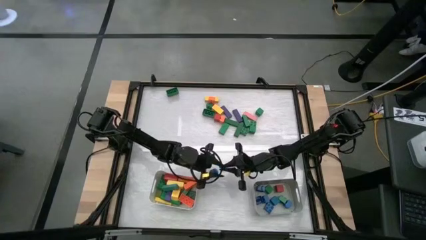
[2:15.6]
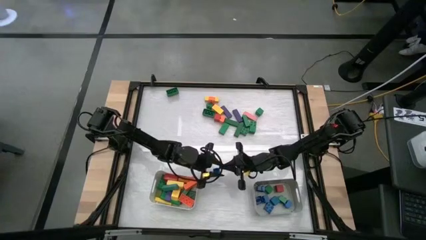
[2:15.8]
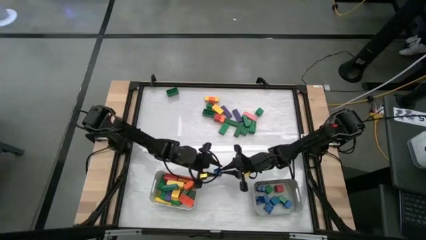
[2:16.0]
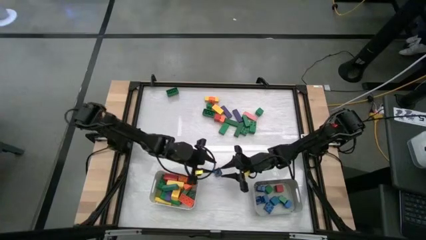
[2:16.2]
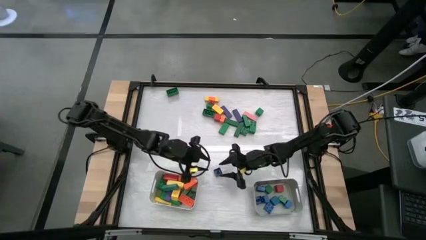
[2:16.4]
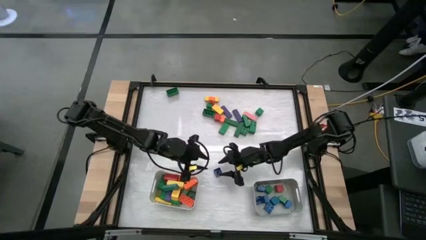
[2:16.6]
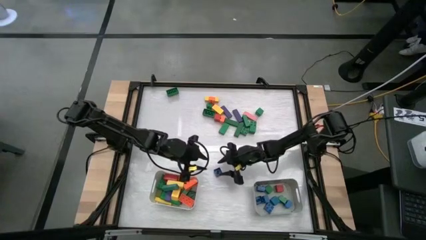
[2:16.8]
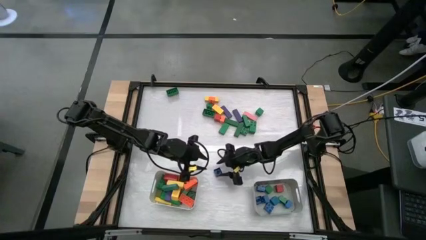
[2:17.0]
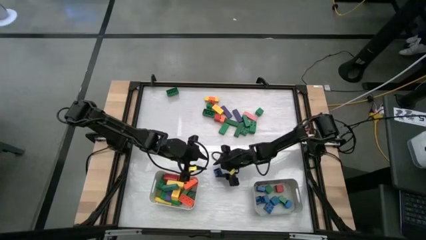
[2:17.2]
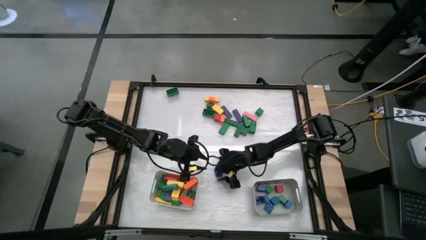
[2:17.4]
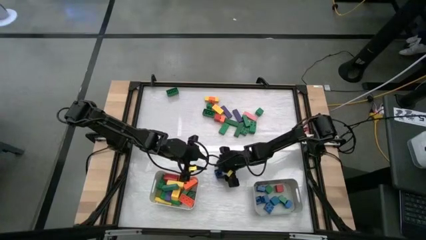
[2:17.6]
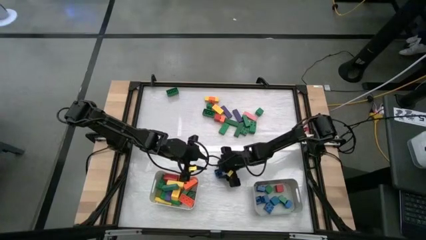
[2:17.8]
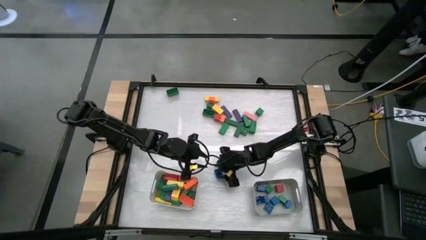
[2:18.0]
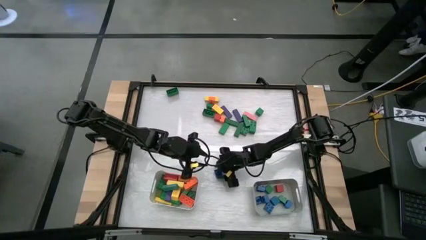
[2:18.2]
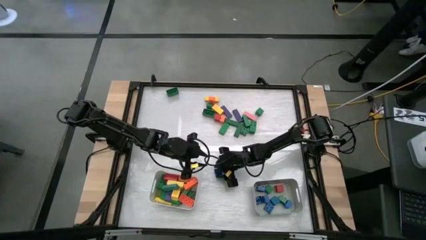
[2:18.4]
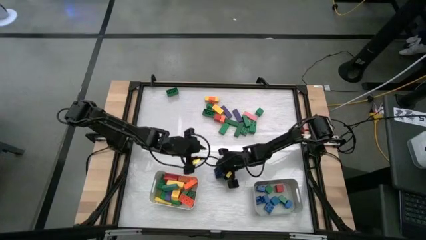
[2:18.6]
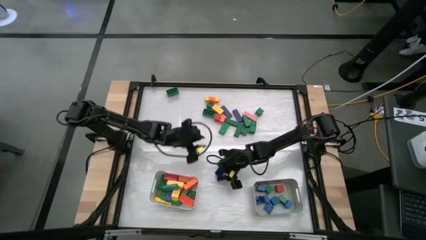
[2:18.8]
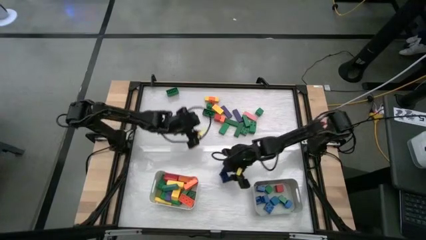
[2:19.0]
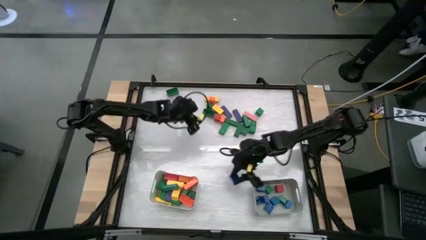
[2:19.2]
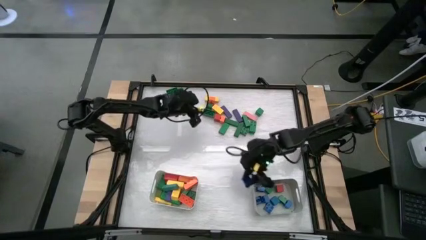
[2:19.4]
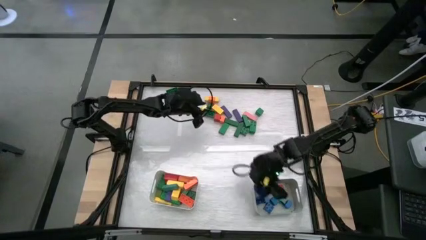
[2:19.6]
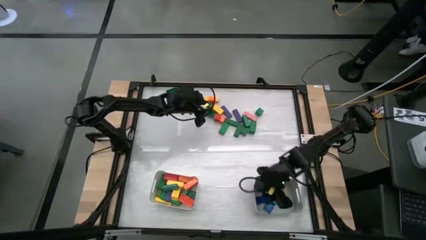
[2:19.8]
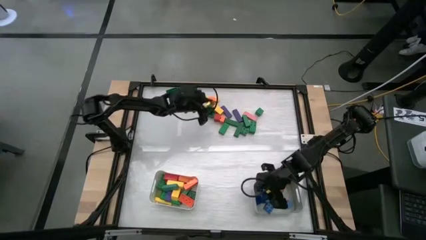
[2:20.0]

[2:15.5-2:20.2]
Task: Sort blocks by size
Put the square blue game piece into the gray bin

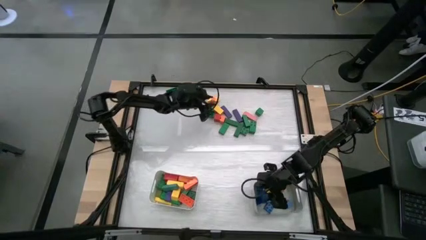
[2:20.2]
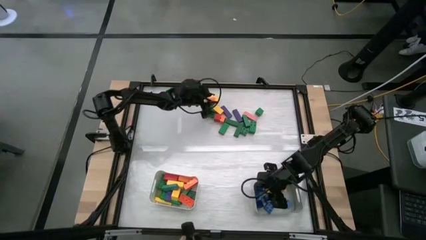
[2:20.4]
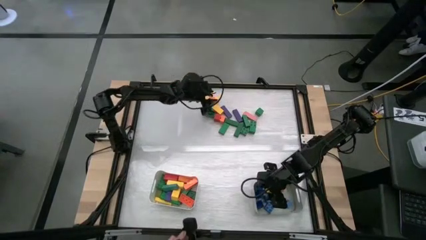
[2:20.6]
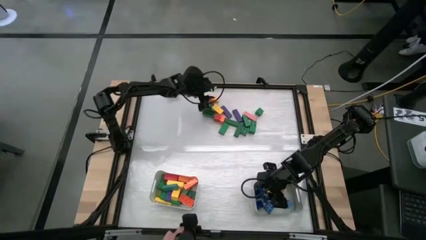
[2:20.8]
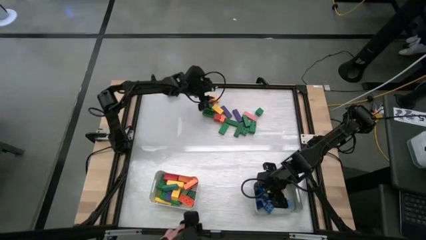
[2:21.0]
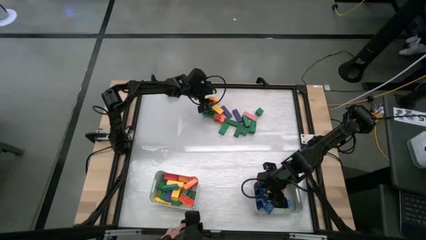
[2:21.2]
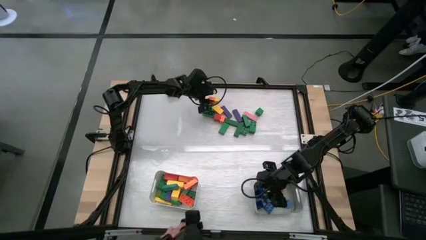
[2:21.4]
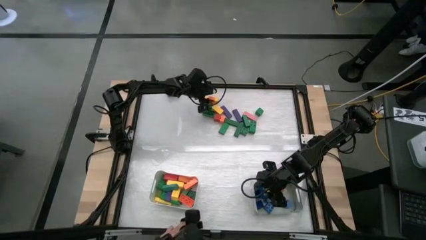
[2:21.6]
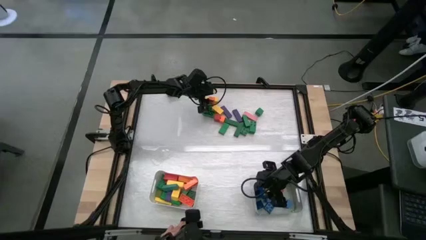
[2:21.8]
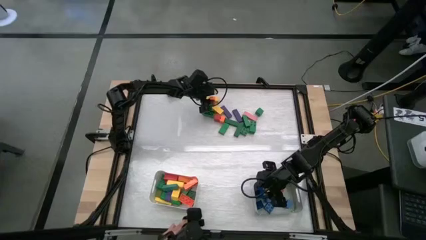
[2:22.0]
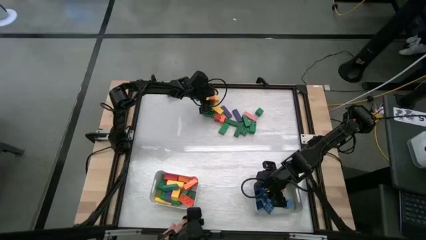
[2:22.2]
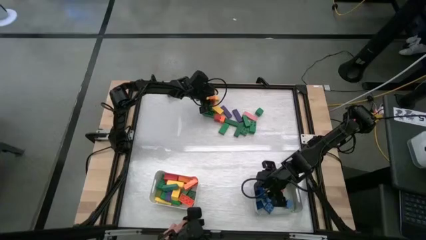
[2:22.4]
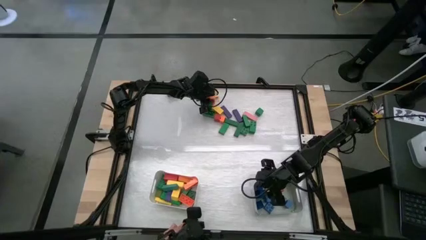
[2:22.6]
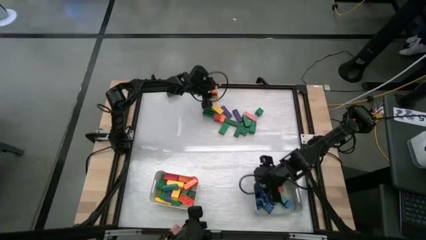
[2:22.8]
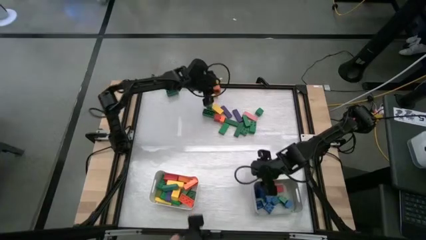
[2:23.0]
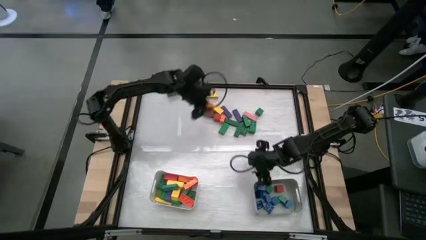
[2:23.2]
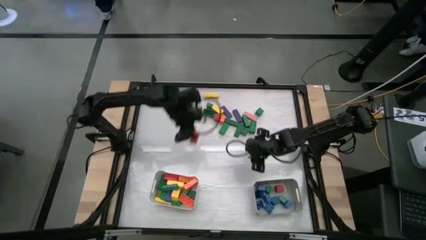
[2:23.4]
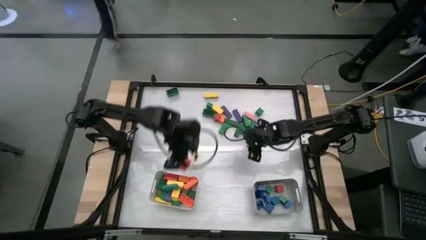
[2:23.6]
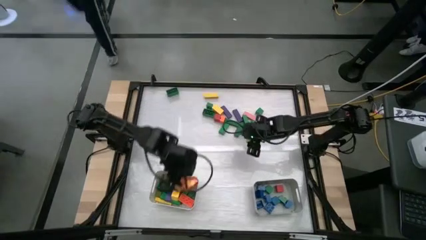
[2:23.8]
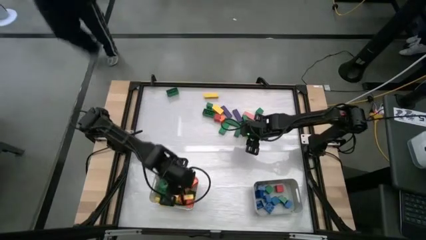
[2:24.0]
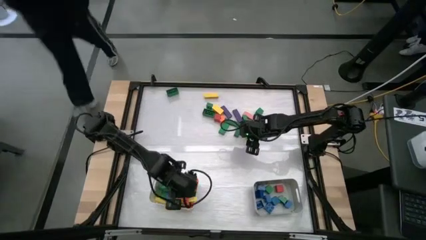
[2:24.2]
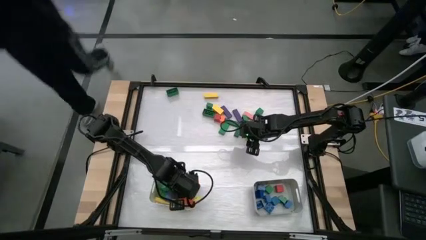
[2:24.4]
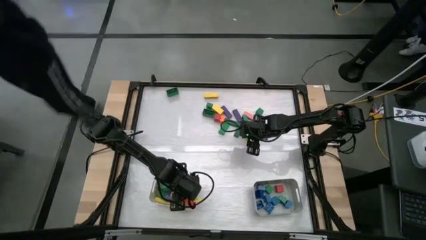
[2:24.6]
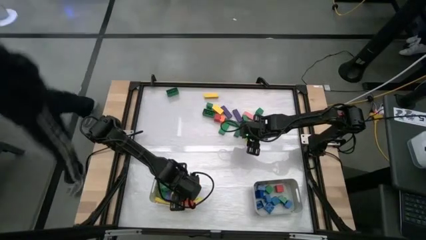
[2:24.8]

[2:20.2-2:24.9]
Put the rectangular orange game piece into the white bin

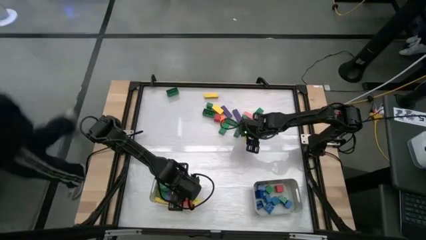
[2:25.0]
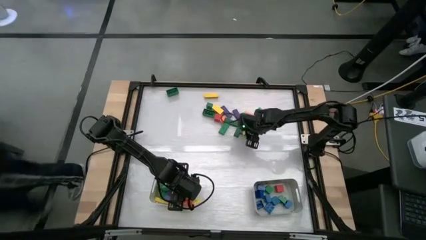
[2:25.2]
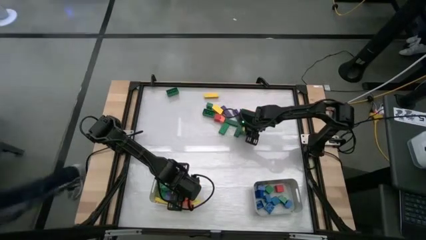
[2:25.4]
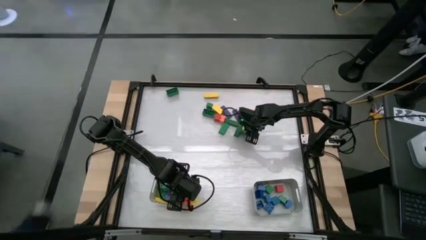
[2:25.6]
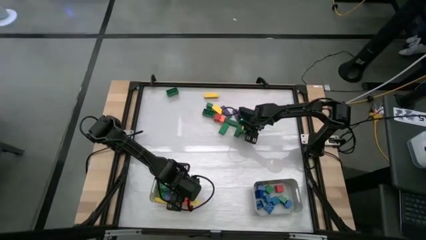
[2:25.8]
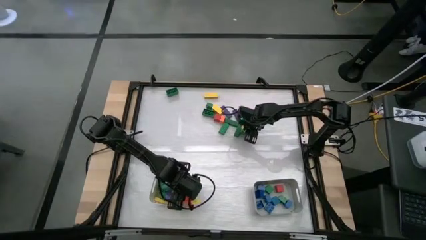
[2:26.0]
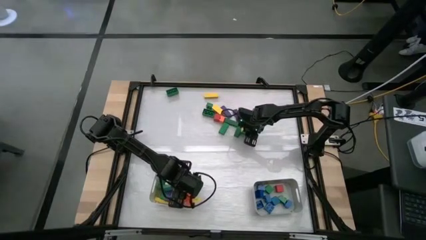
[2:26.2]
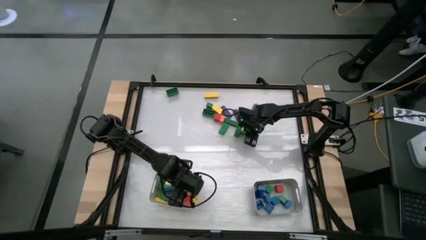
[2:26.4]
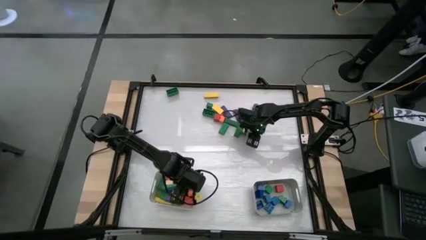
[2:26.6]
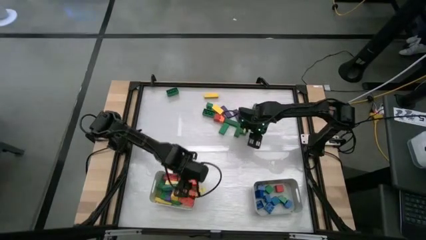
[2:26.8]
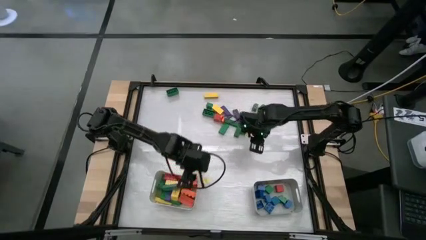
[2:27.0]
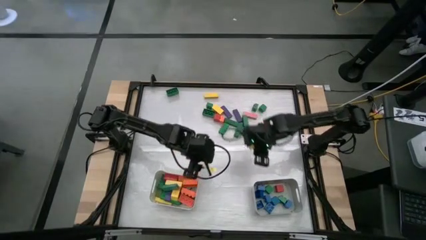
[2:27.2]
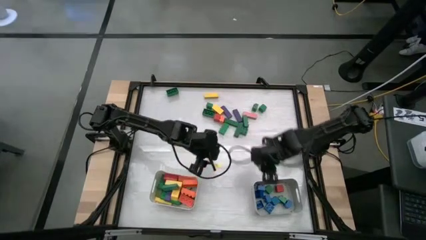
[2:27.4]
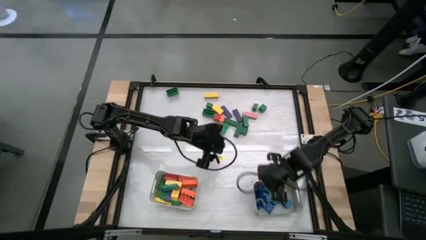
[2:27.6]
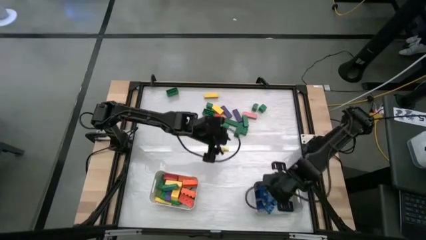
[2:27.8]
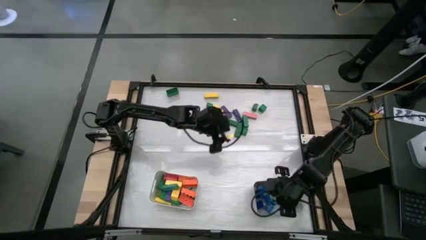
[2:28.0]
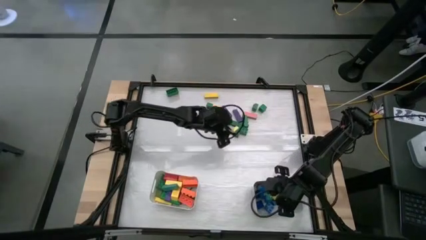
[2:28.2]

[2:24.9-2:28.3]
Put the square green block into the gray bin

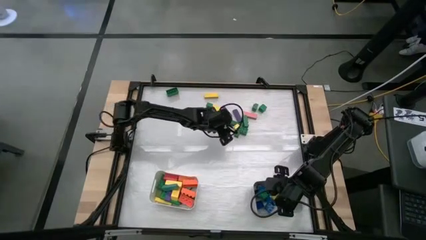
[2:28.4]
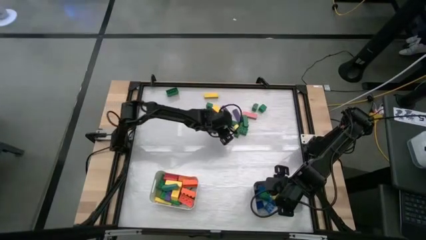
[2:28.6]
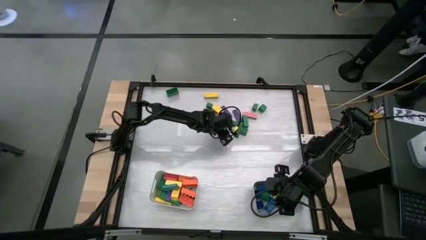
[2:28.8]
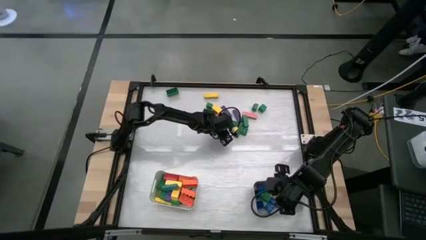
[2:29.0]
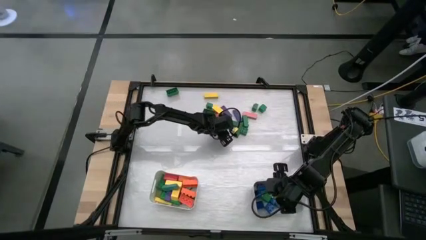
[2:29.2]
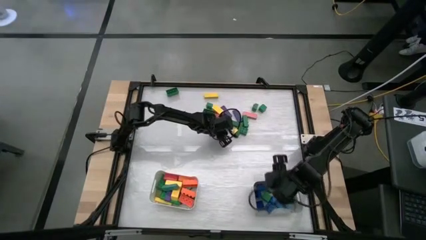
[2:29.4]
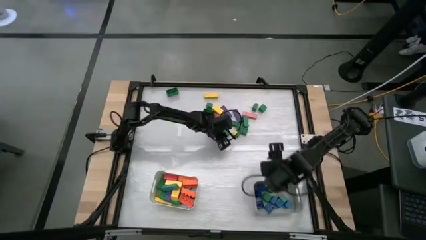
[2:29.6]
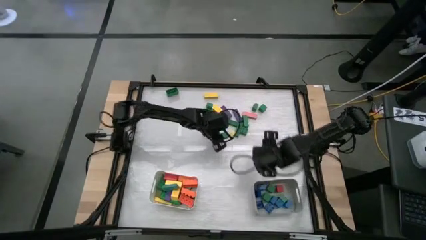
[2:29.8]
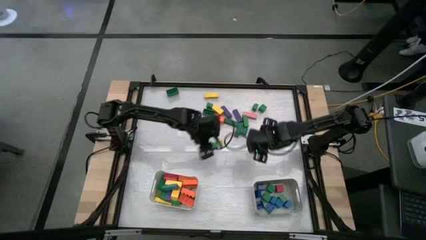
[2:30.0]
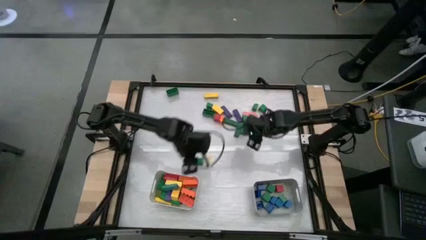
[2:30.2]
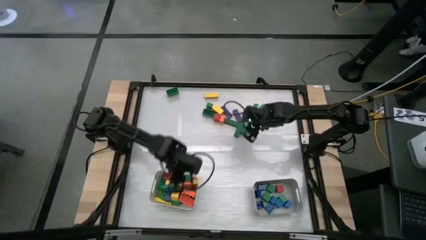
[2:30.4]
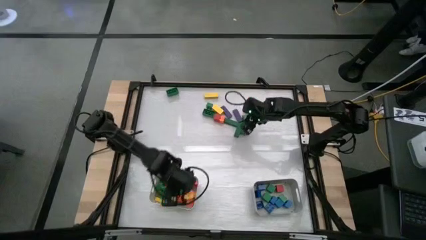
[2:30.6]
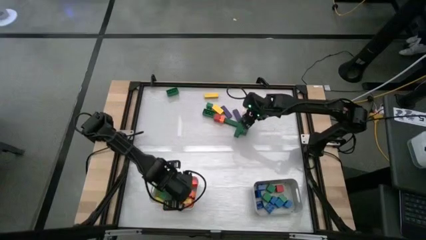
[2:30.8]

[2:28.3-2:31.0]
Put the rectangular green block into the white bin
